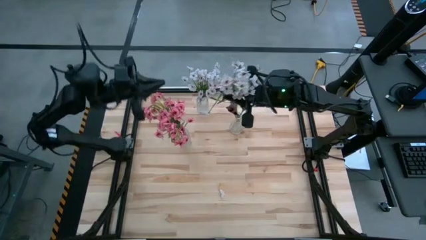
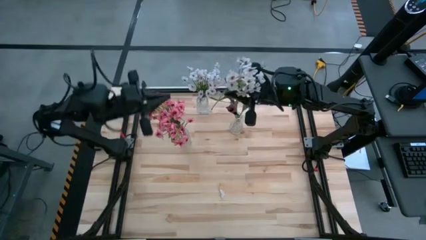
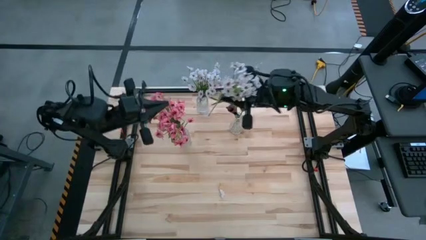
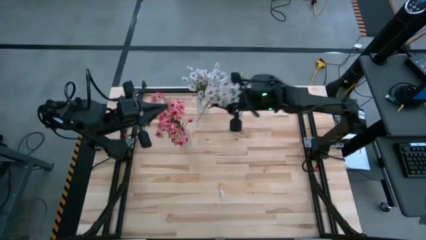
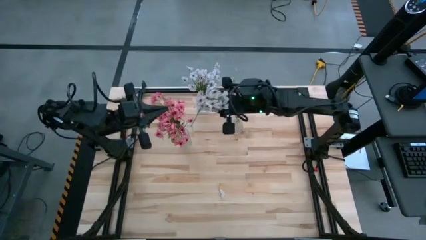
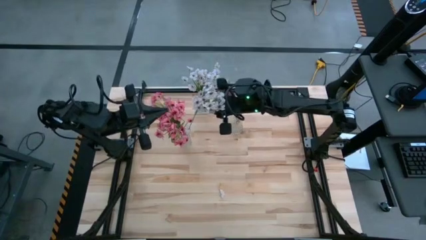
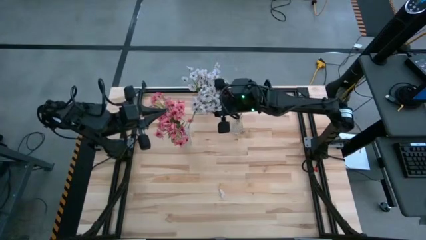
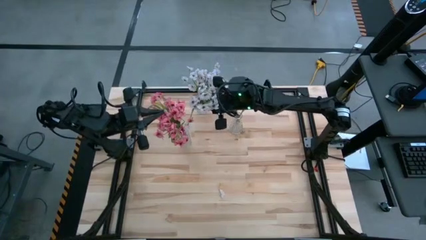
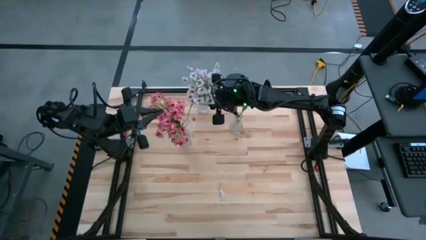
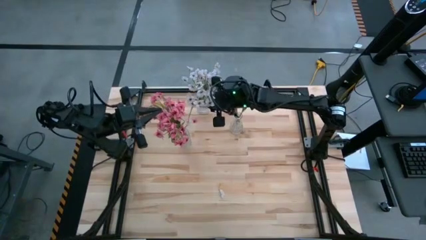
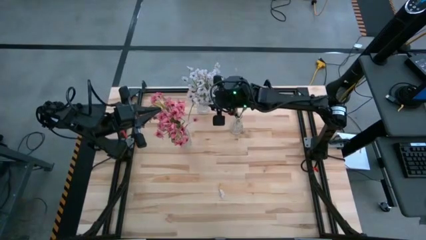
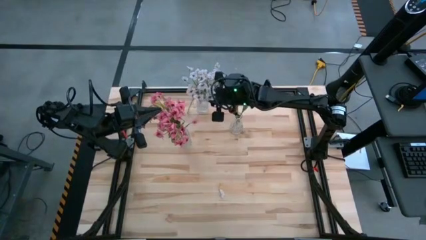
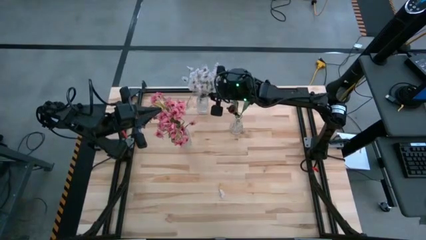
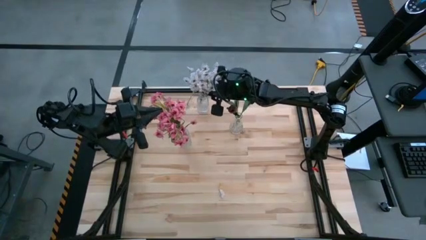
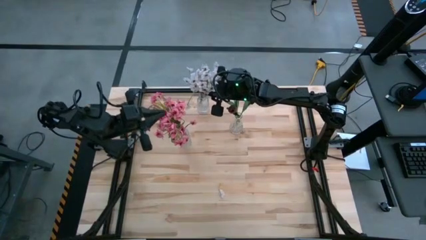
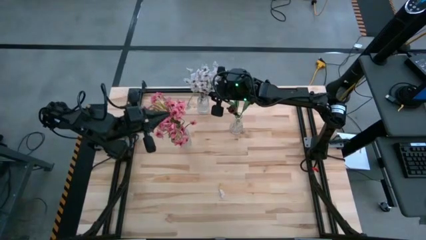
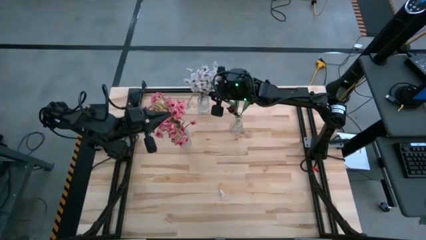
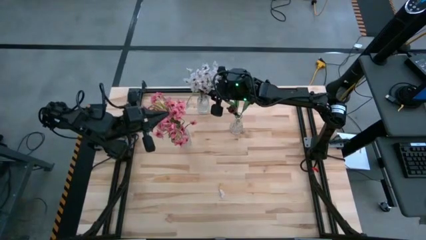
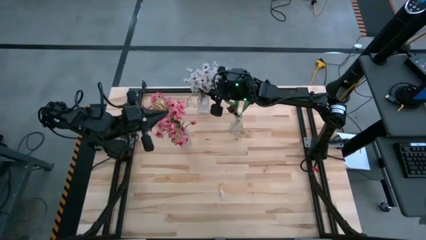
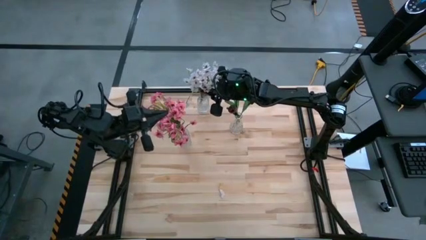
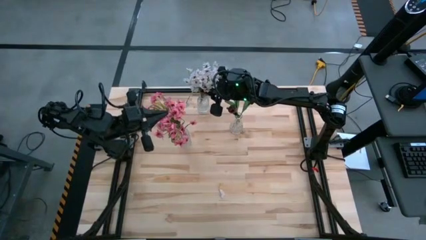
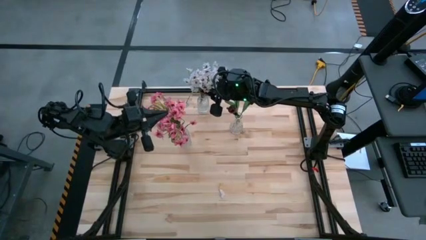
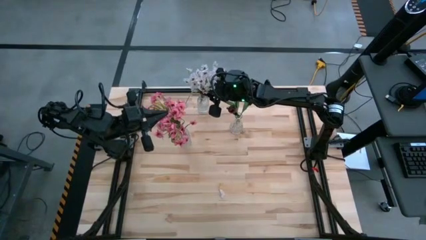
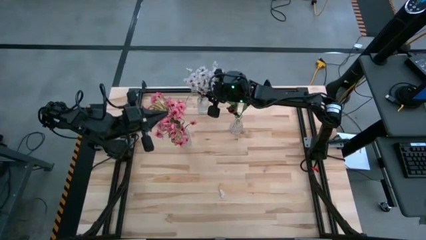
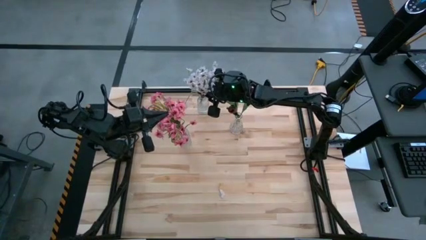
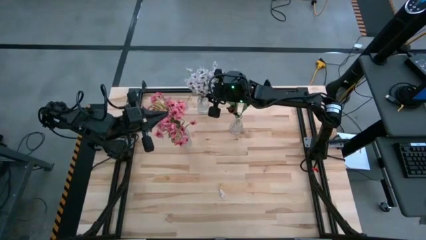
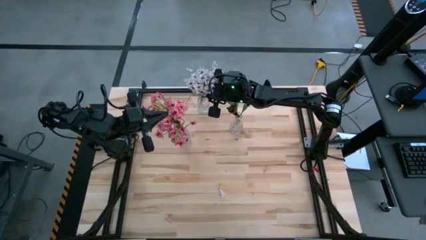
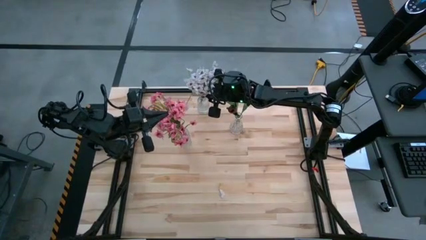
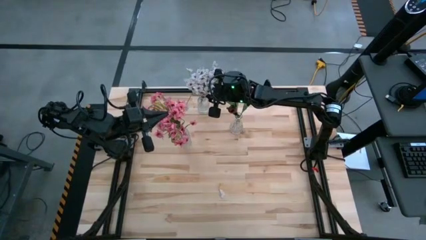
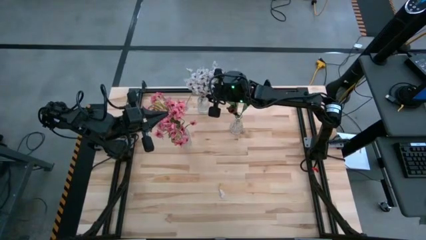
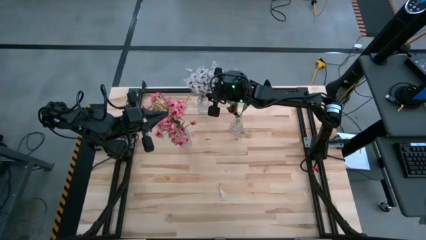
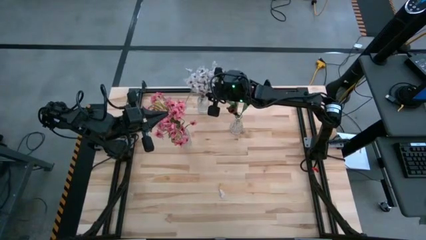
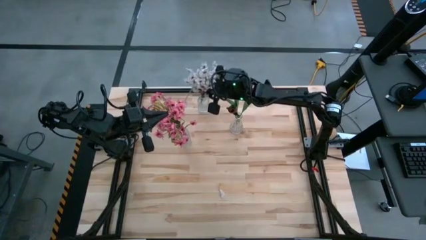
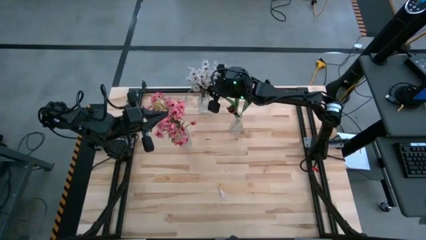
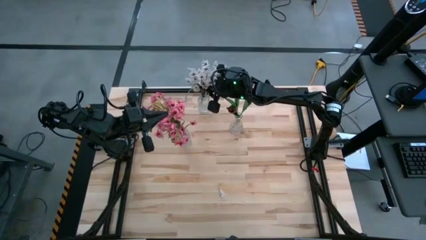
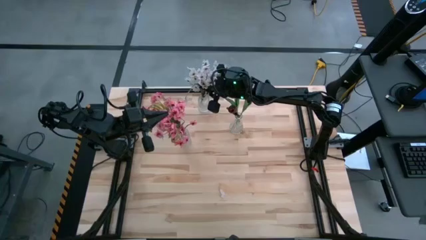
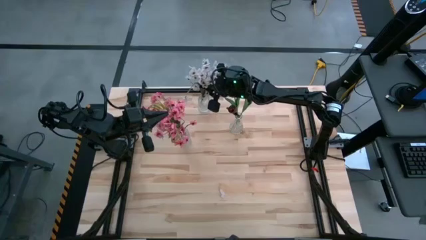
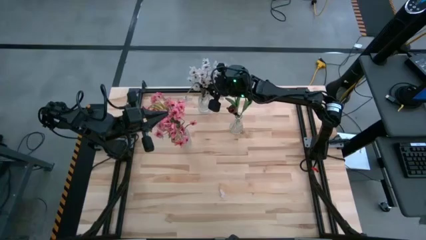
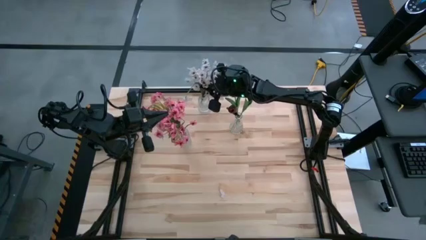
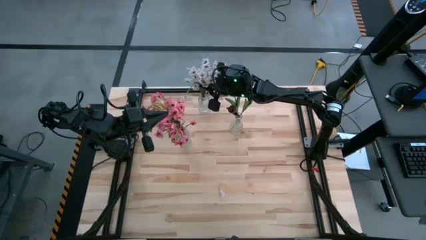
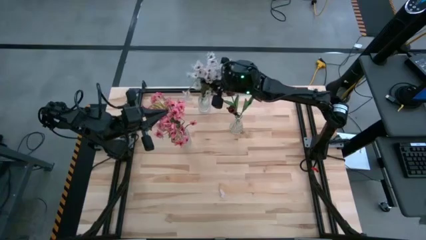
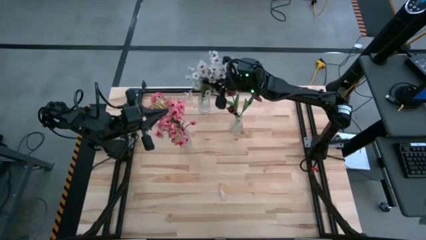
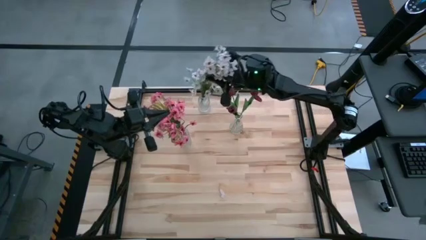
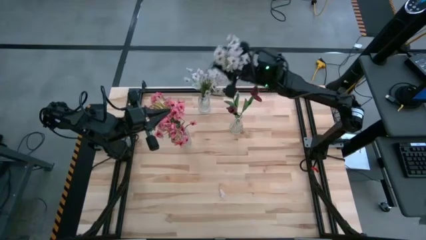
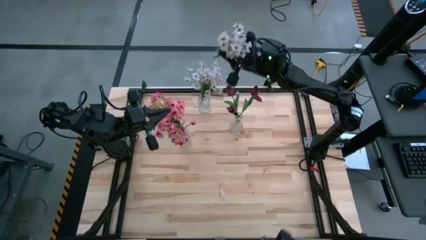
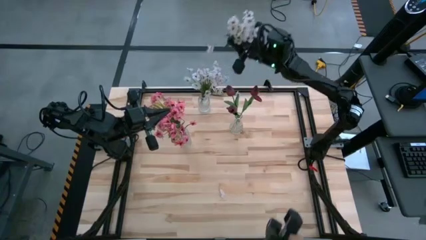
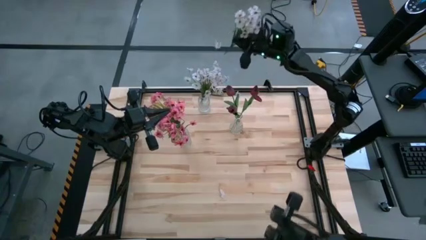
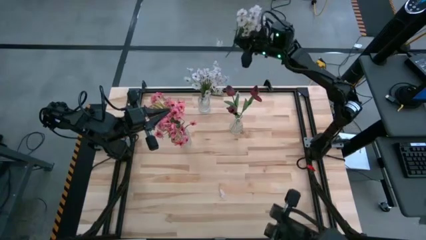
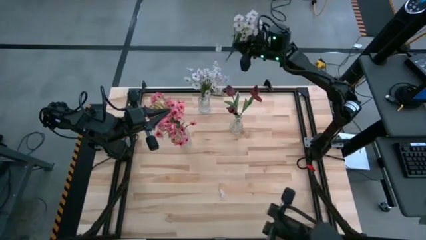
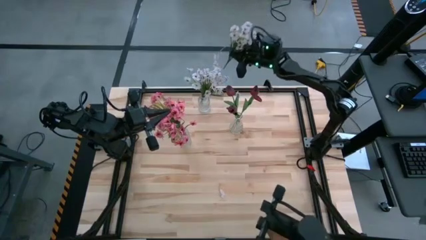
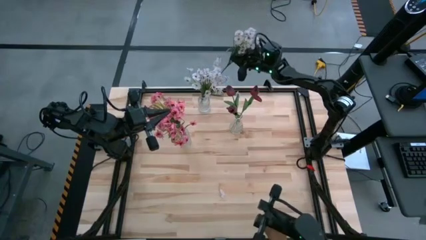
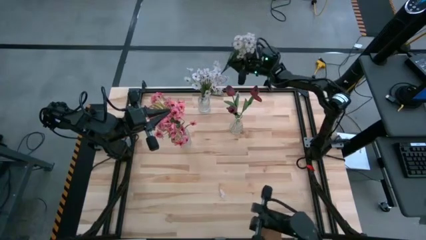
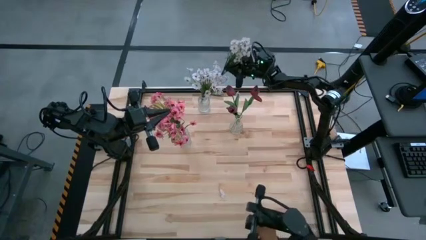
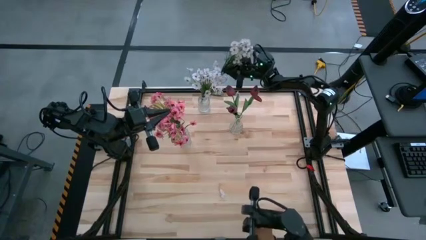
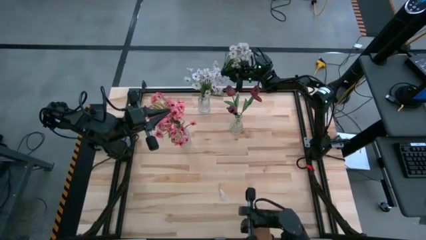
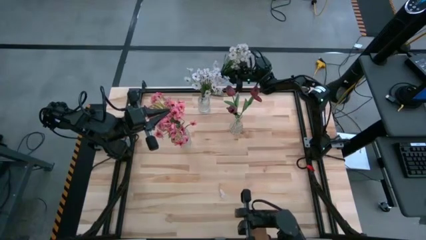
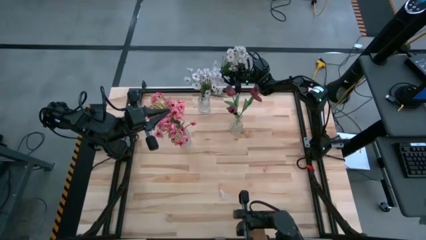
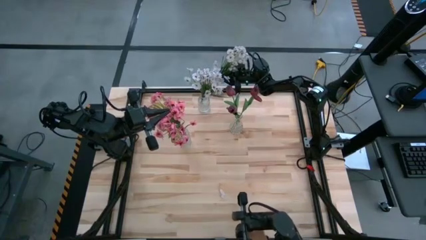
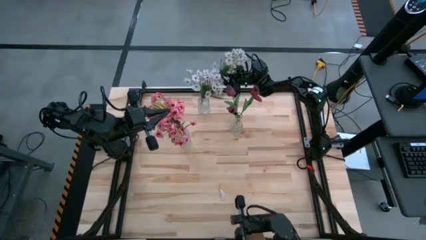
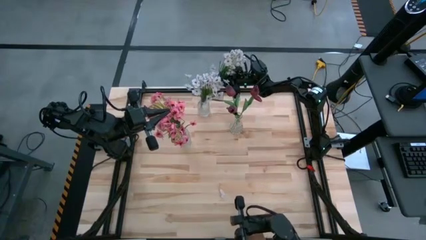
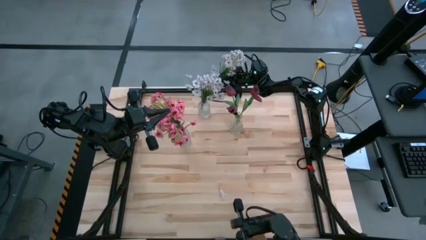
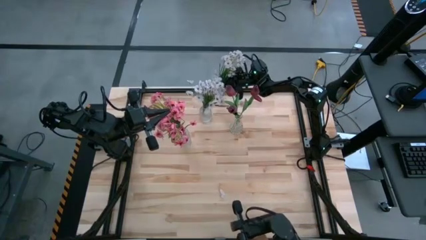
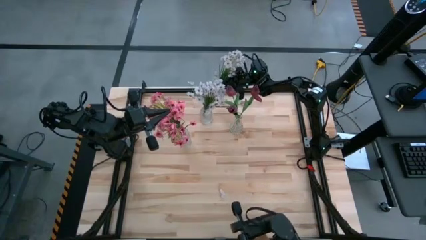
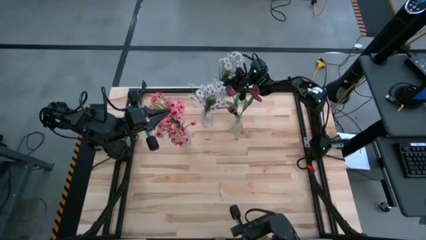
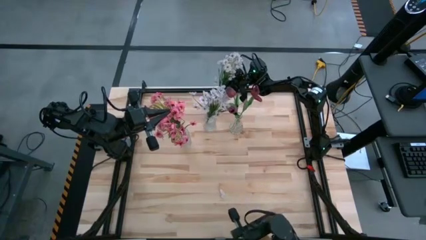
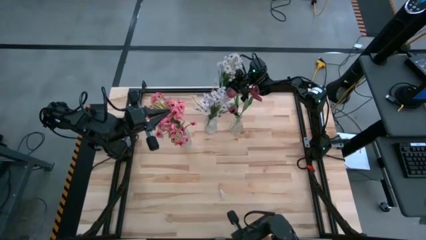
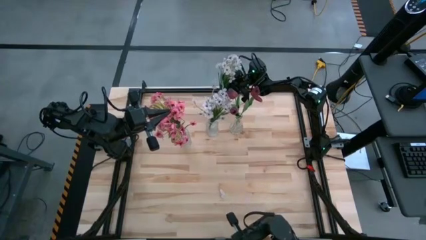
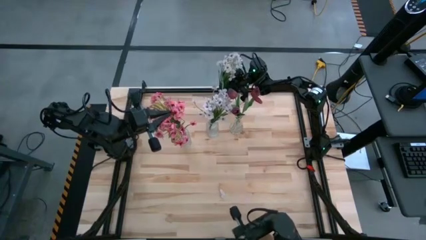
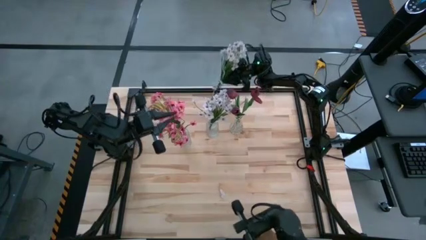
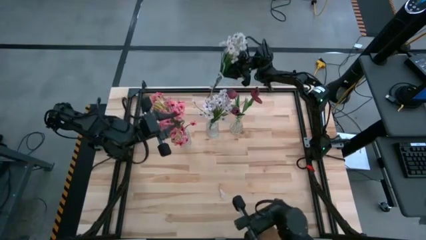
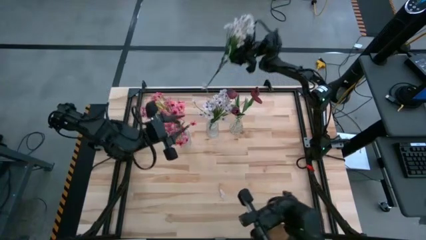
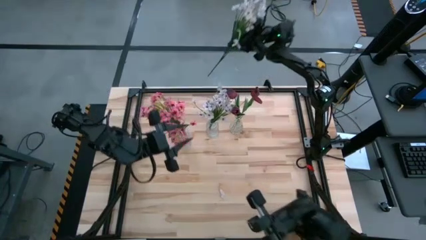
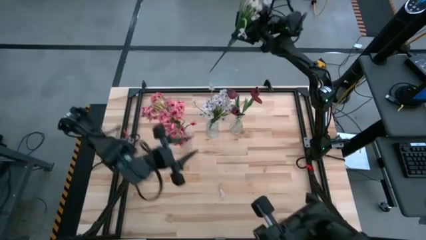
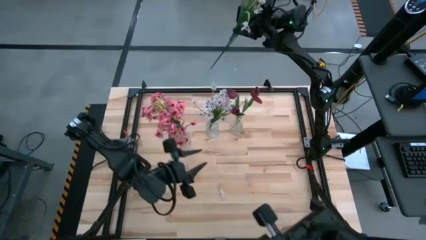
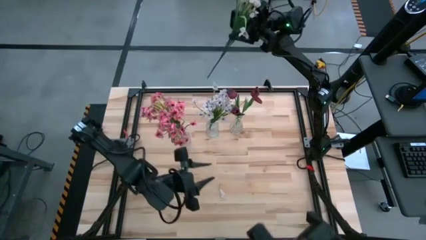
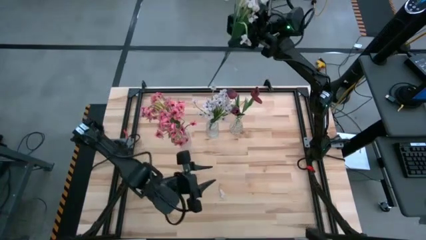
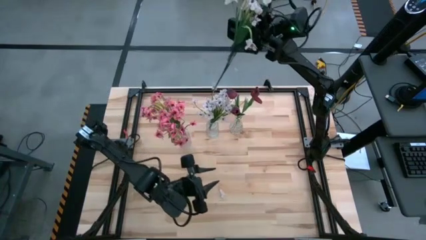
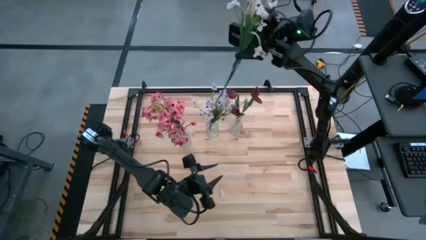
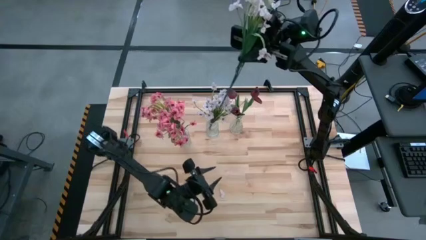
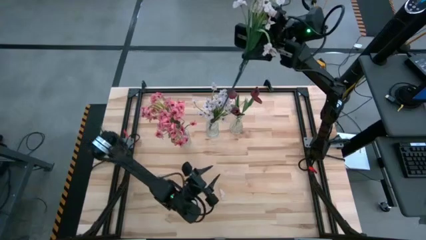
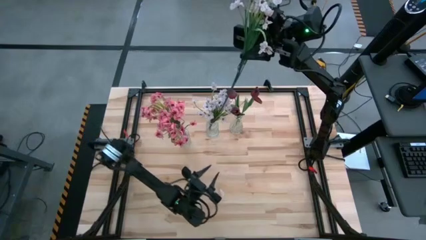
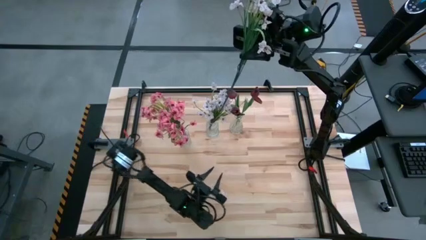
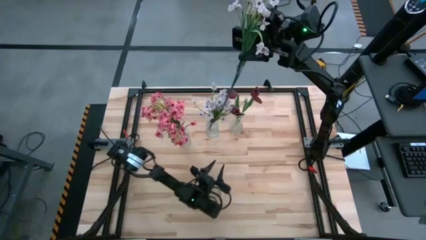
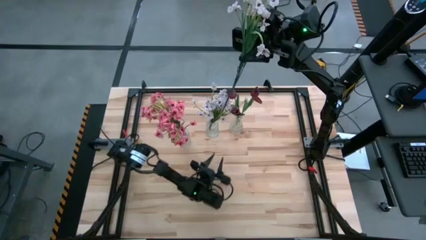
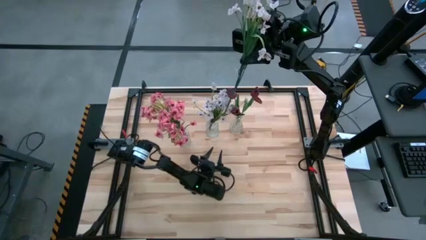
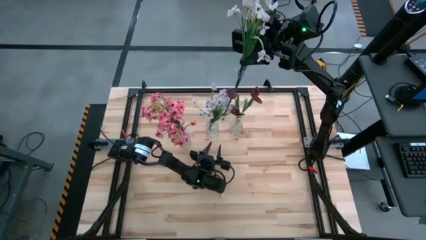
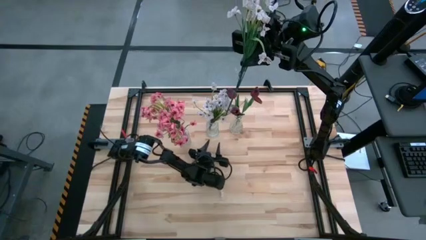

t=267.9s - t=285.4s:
Task: Sort flowers into vase by color
Put the white flower into the top transparent vase
